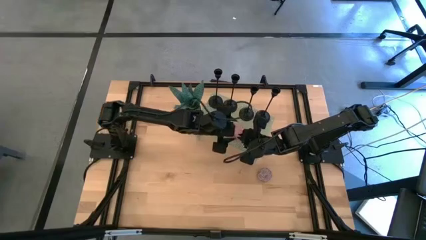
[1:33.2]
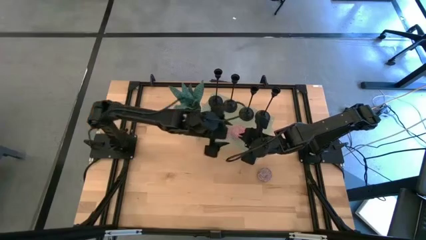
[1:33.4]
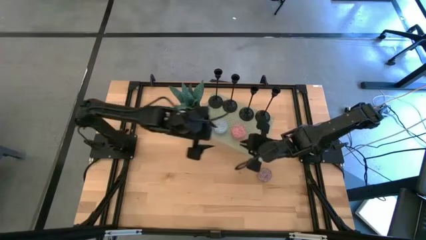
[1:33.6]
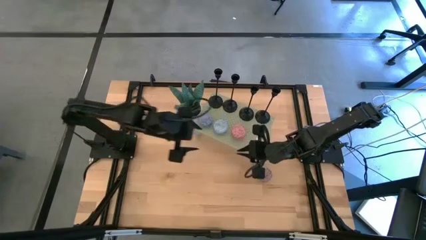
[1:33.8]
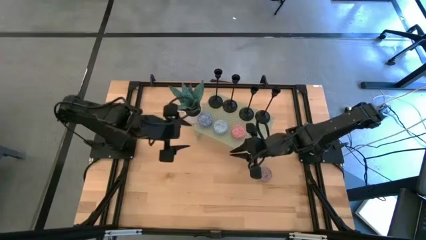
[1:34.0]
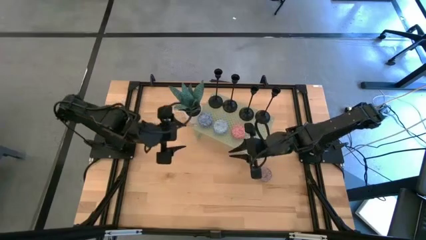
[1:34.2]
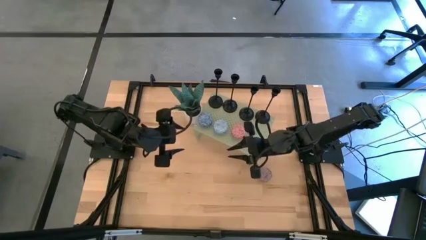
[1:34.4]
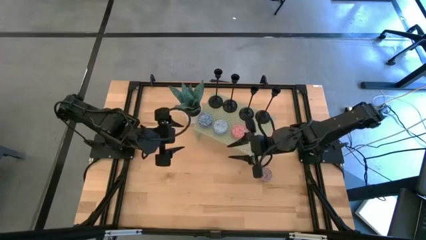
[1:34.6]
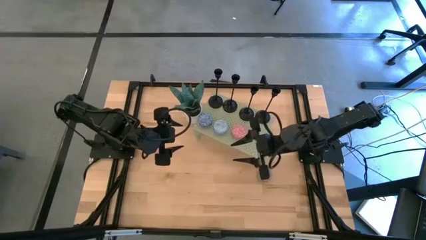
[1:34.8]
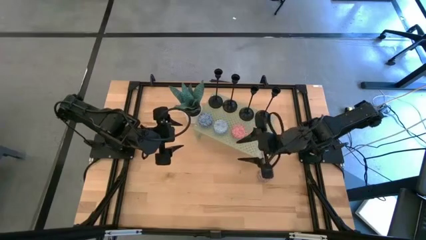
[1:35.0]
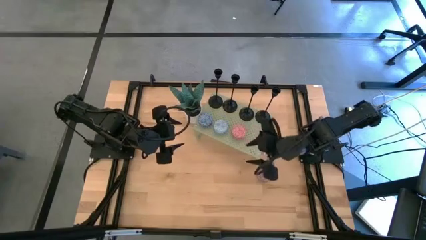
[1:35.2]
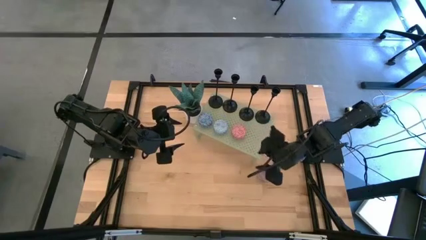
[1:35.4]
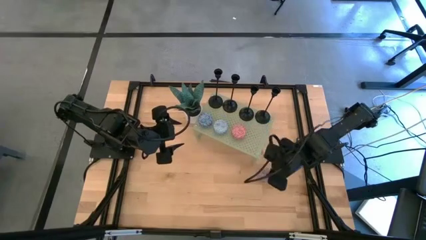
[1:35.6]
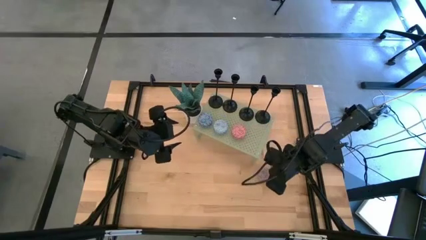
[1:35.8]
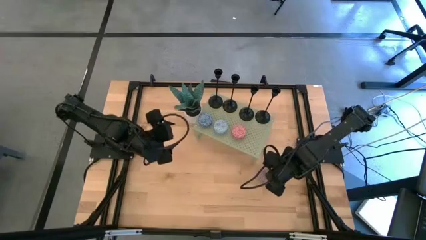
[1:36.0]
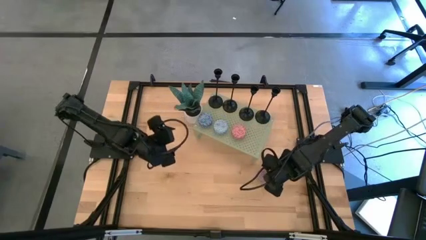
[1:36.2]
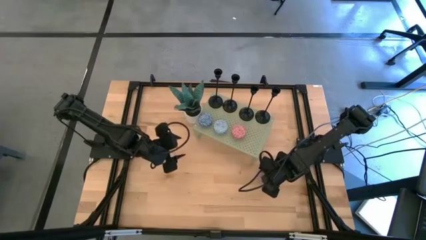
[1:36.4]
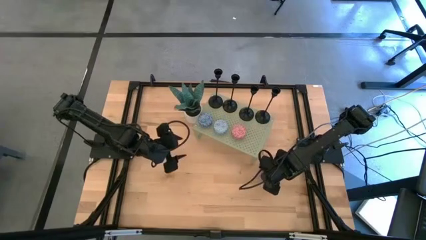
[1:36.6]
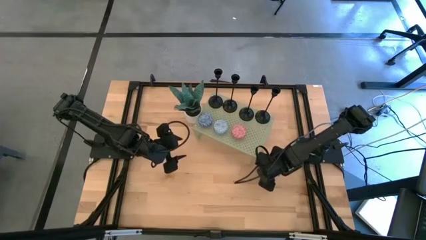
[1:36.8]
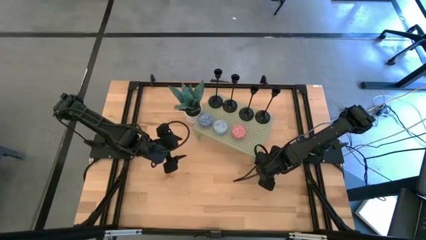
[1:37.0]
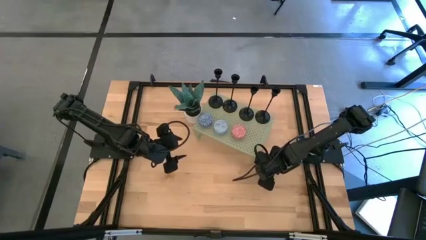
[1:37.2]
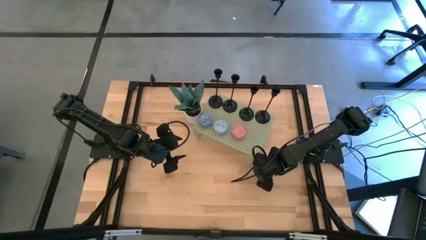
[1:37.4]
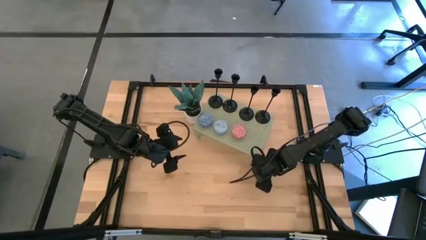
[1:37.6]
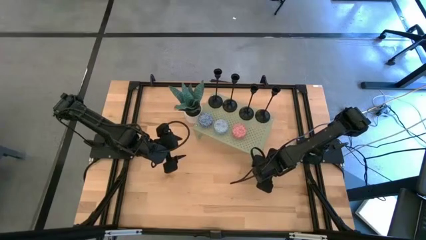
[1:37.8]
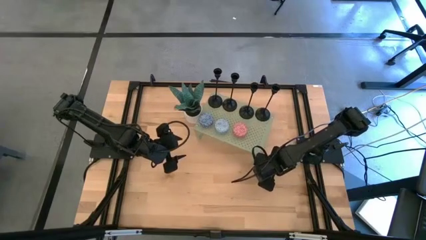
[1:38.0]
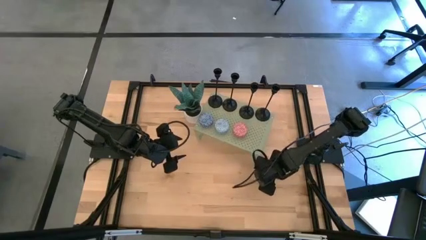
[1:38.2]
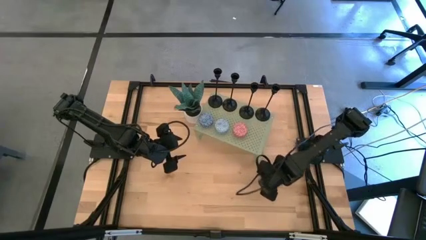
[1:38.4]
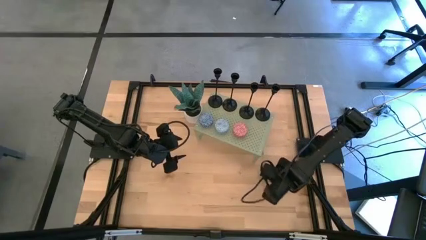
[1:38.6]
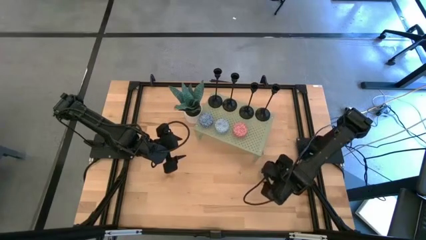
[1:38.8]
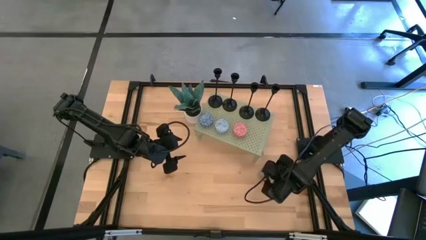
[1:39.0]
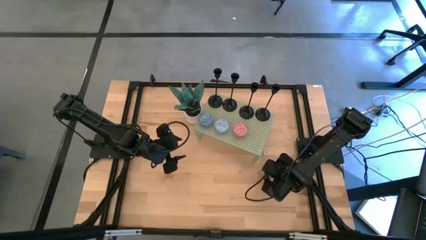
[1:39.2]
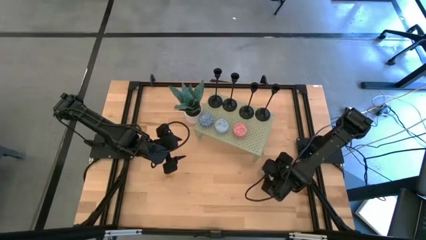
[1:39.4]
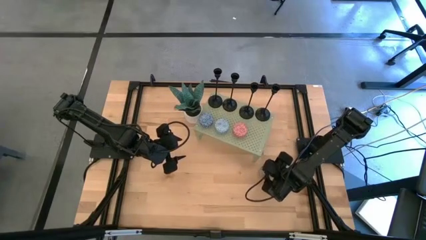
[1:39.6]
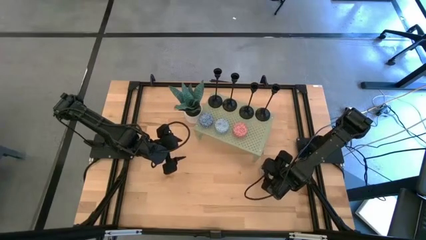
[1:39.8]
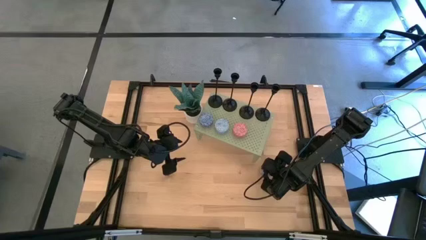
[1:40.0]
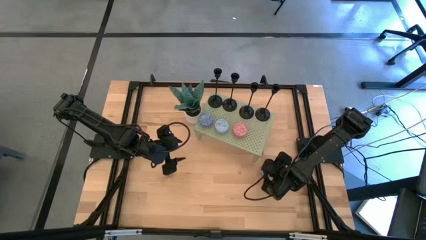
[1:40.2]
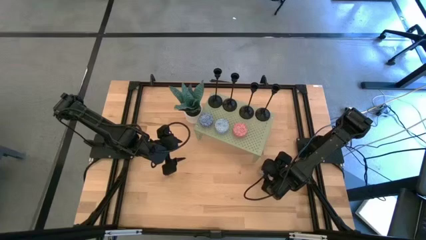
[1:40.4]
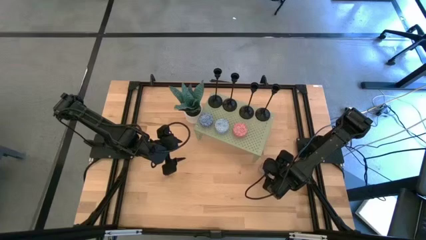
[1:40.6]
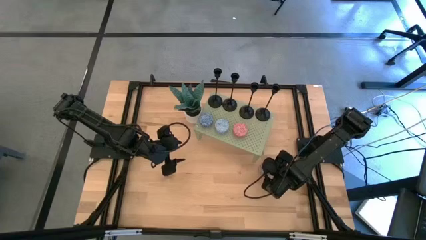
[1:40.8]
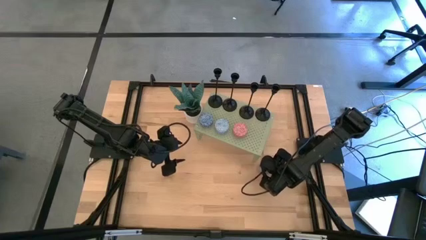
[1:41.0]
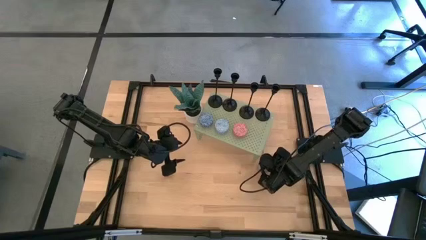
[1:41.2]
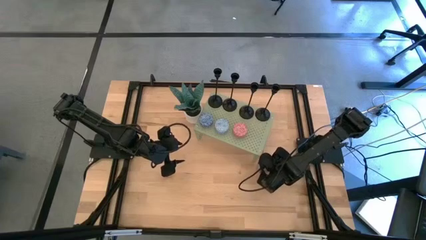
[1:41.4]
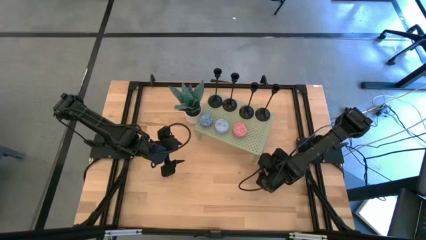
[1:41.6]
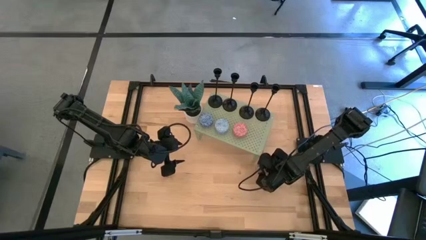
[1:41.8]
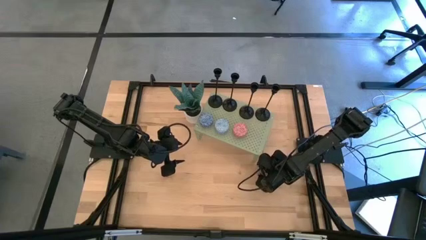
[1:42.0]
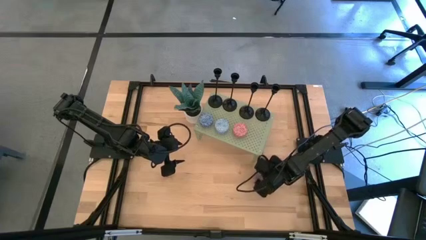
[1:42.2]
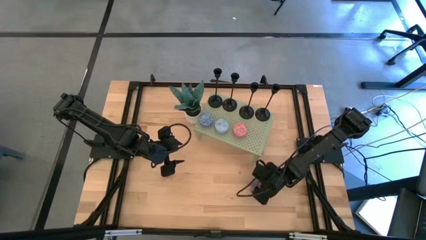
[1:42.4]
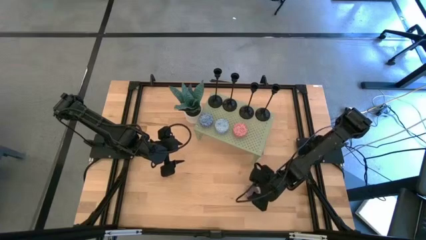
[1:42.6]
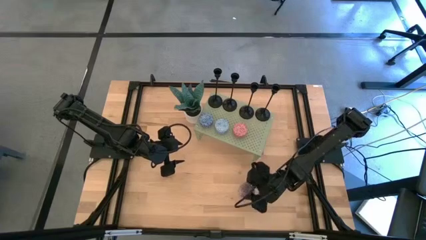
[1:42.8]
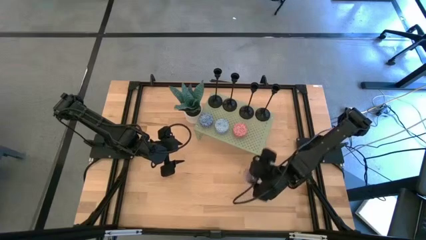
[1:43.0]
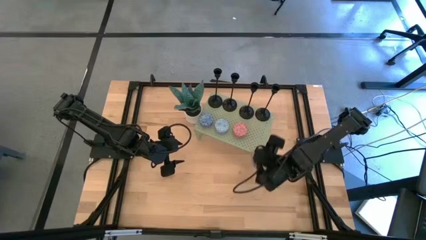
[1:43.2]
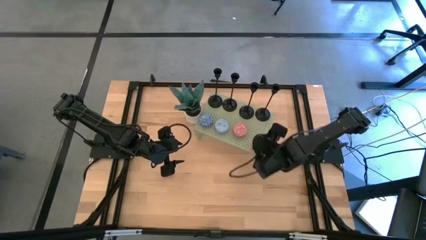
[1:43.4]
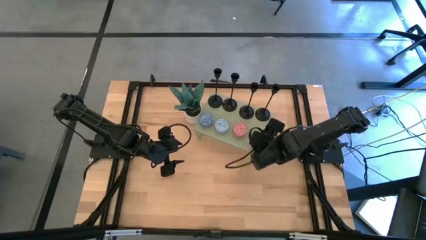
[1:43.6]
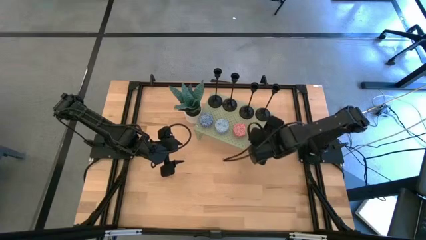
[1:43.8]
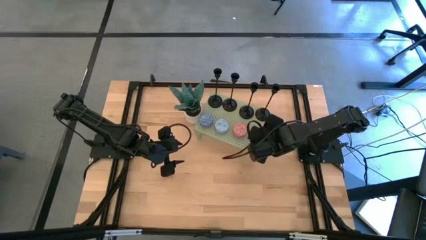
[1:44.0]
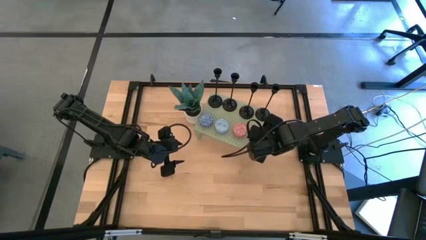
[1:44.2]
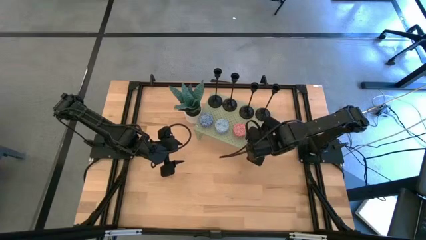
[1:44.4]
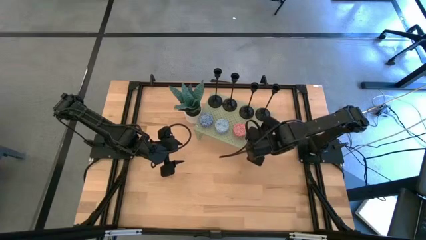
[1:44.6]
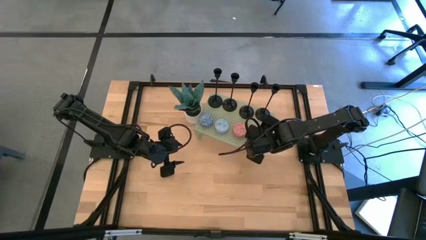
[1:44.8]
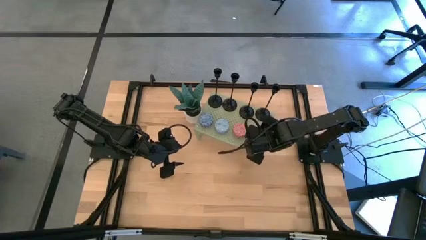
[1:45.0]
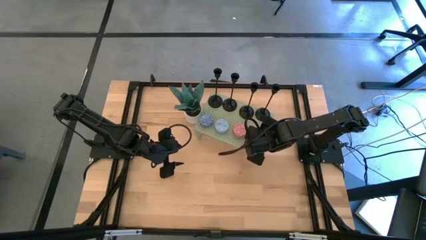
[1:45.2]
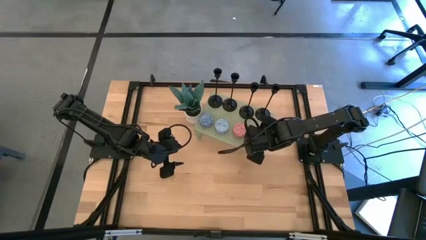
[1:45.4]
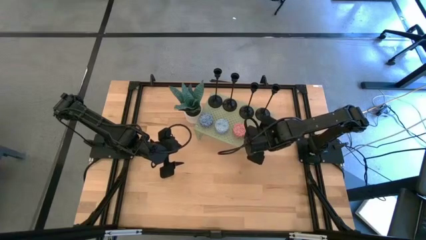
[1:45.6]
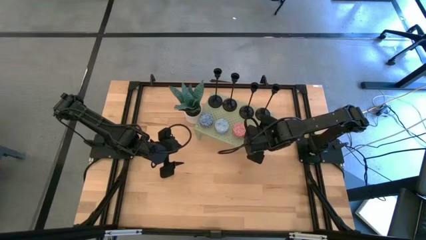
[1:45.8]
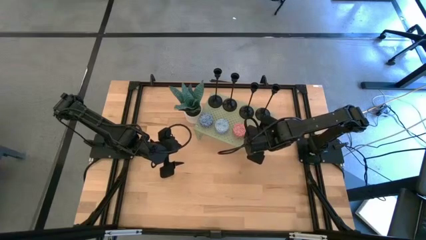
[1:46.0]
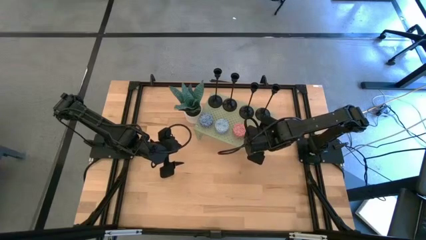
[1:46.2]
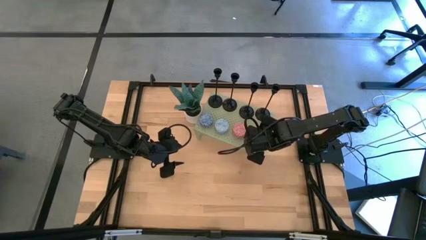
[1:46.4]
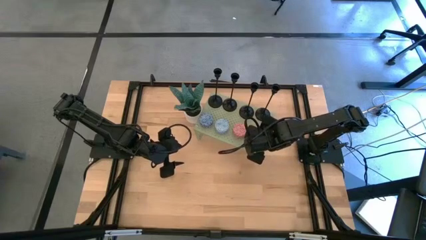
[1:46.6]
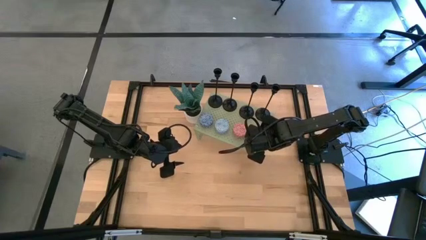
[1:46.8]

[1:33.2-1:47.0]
Task: Stock candles and holders on shelf
Align the red scented candle with the other scented candles on the shelf
